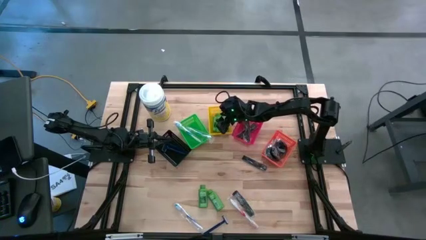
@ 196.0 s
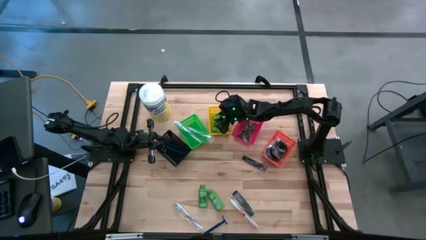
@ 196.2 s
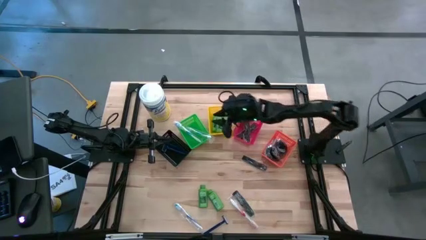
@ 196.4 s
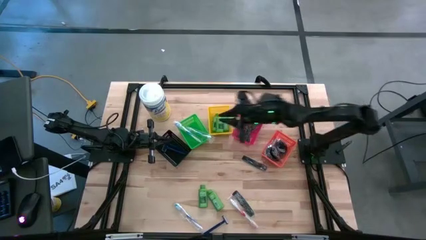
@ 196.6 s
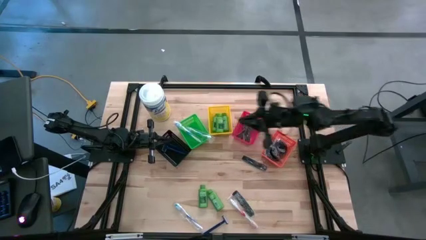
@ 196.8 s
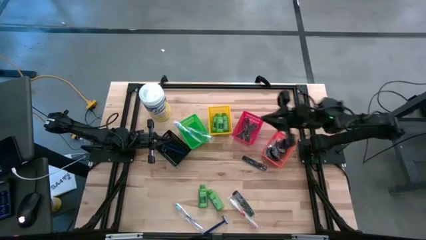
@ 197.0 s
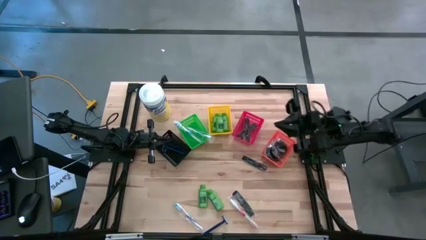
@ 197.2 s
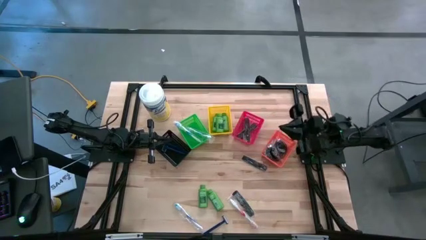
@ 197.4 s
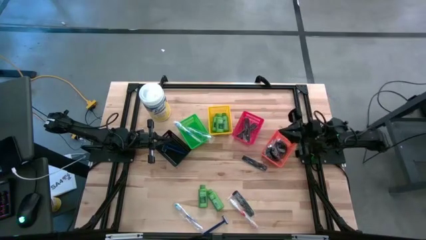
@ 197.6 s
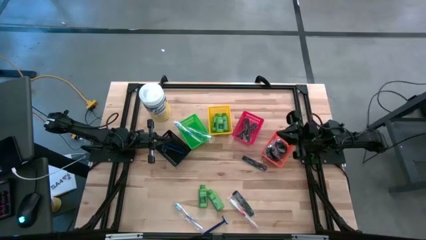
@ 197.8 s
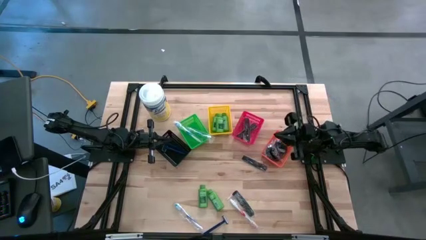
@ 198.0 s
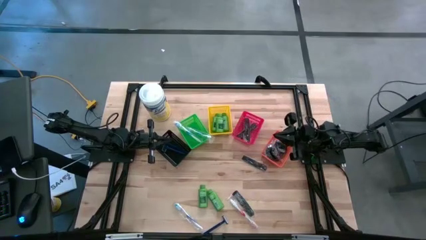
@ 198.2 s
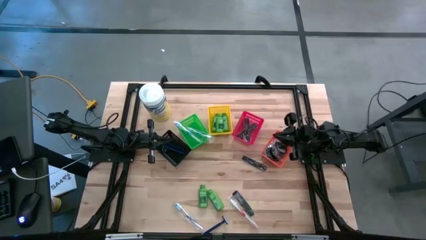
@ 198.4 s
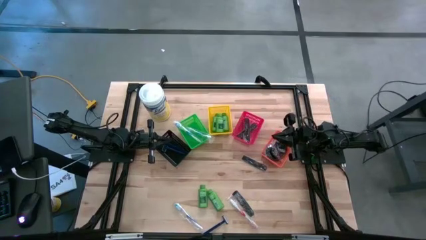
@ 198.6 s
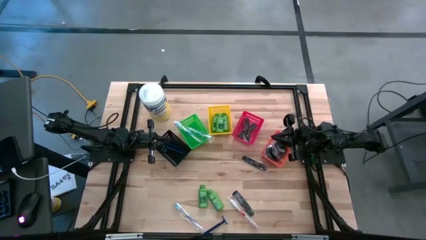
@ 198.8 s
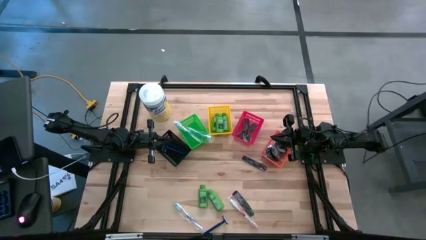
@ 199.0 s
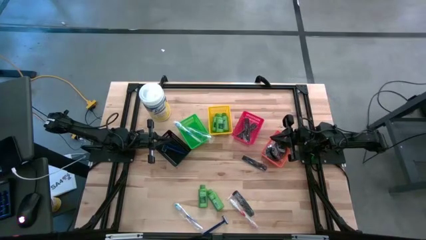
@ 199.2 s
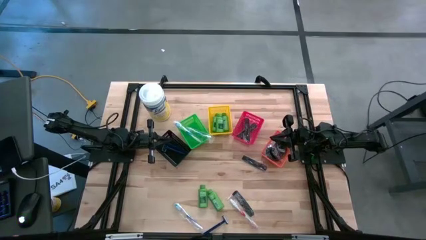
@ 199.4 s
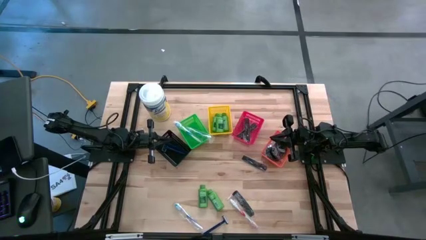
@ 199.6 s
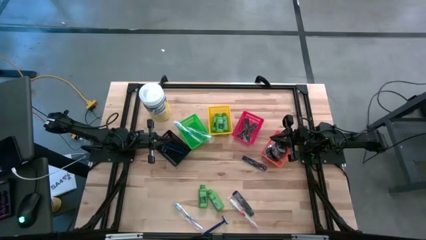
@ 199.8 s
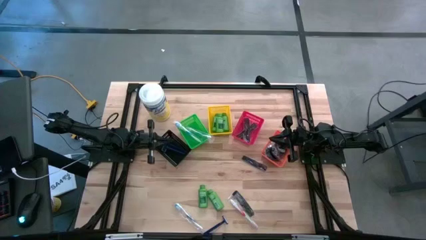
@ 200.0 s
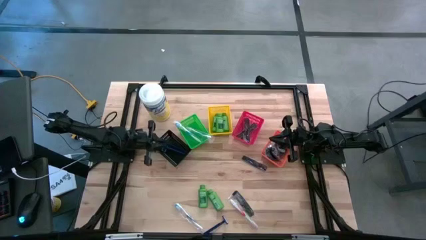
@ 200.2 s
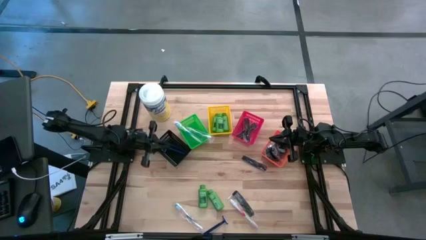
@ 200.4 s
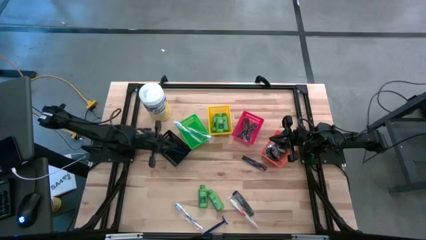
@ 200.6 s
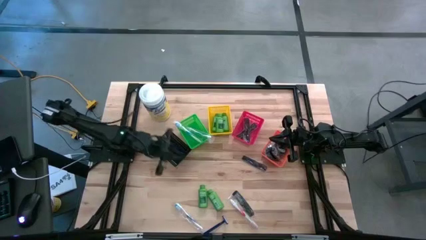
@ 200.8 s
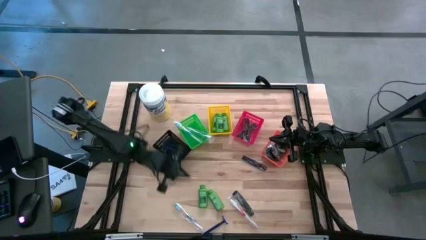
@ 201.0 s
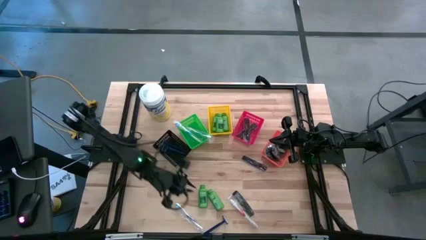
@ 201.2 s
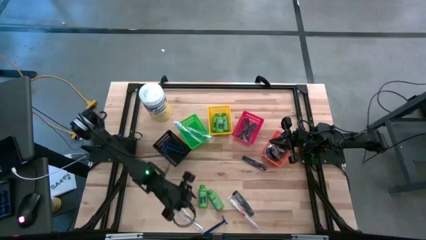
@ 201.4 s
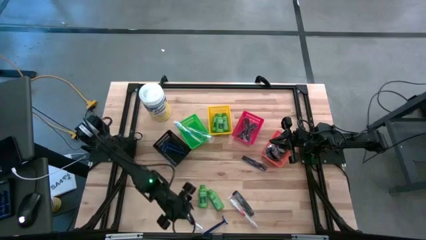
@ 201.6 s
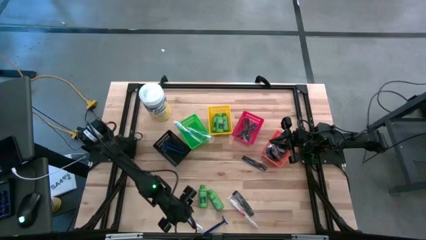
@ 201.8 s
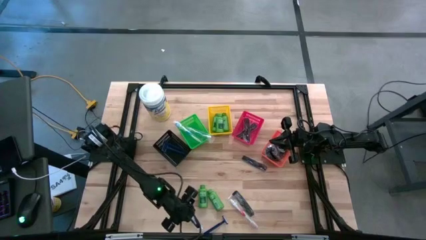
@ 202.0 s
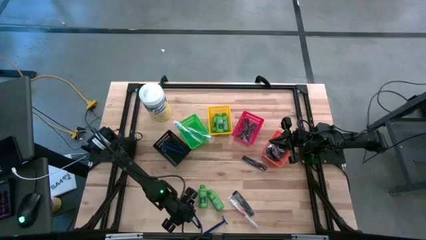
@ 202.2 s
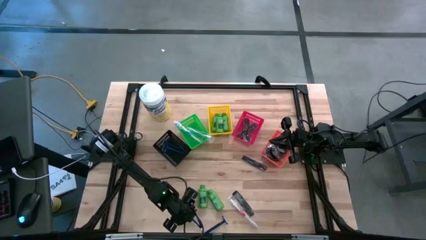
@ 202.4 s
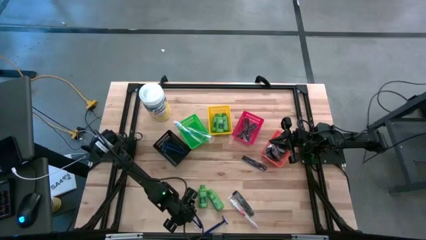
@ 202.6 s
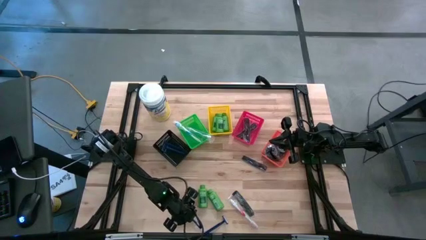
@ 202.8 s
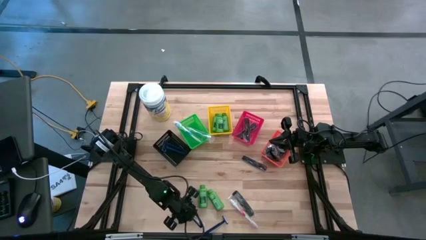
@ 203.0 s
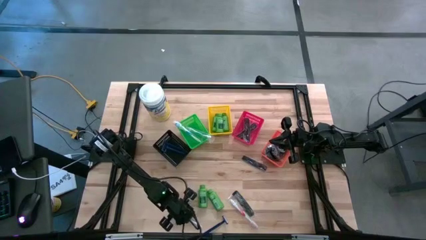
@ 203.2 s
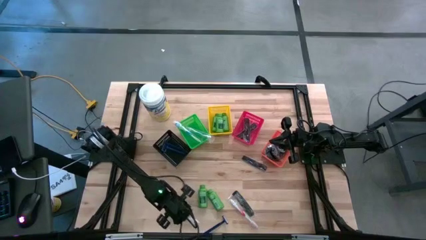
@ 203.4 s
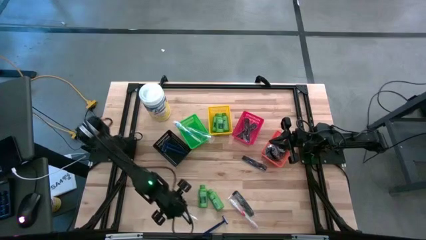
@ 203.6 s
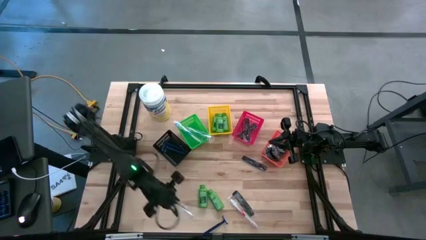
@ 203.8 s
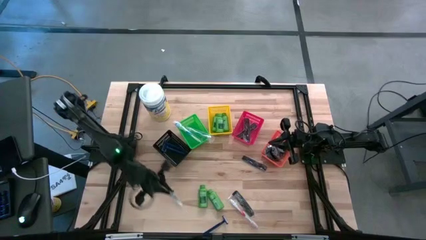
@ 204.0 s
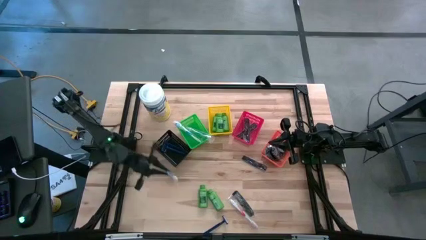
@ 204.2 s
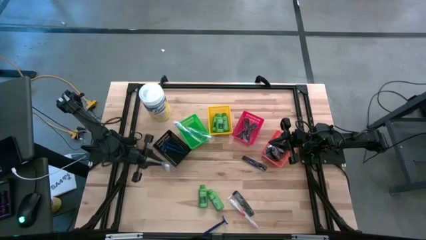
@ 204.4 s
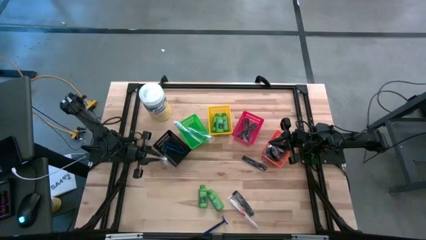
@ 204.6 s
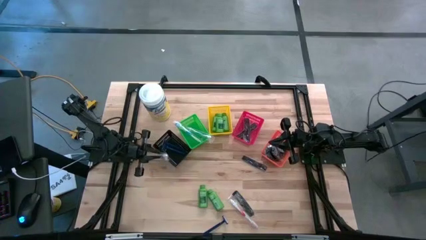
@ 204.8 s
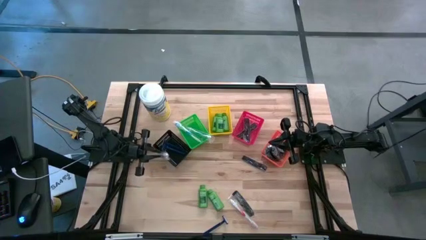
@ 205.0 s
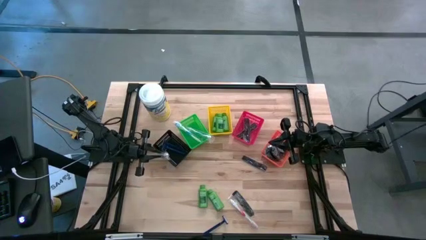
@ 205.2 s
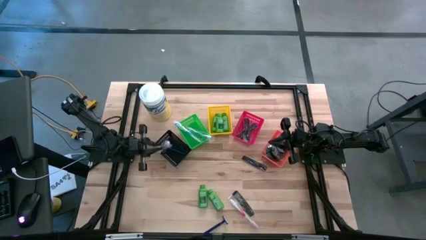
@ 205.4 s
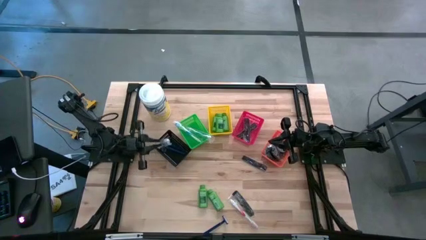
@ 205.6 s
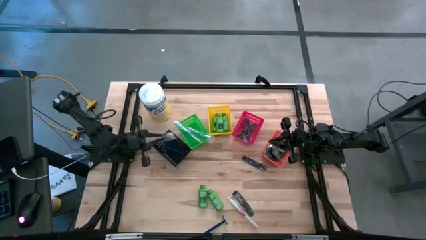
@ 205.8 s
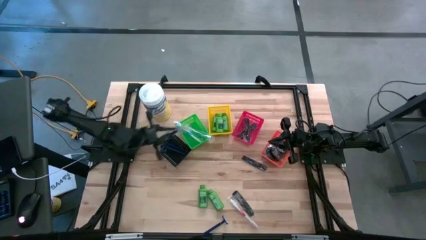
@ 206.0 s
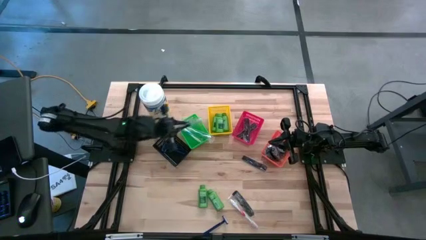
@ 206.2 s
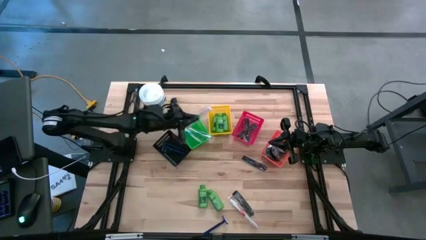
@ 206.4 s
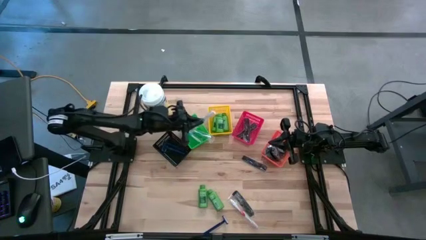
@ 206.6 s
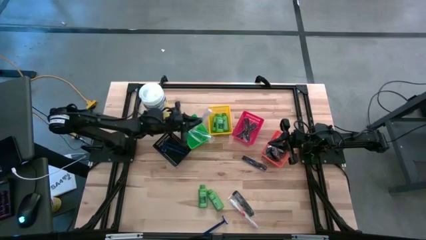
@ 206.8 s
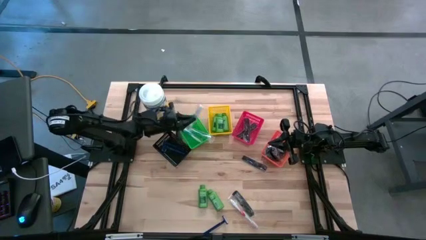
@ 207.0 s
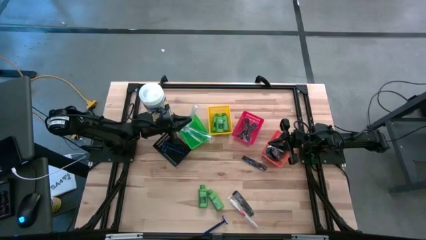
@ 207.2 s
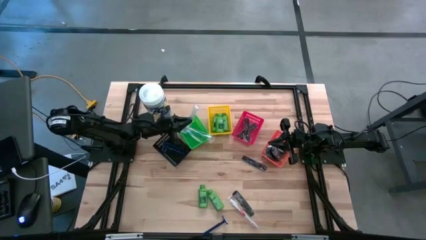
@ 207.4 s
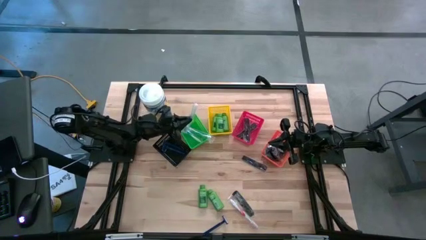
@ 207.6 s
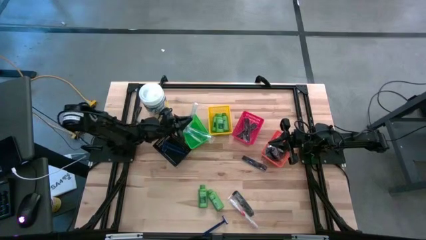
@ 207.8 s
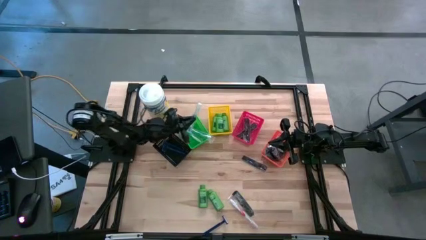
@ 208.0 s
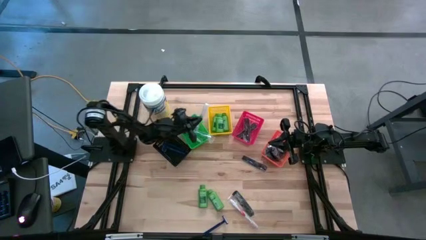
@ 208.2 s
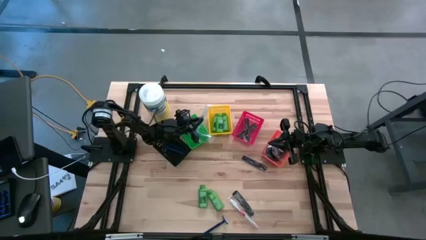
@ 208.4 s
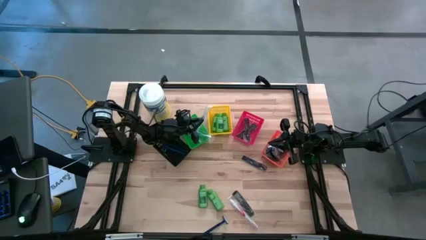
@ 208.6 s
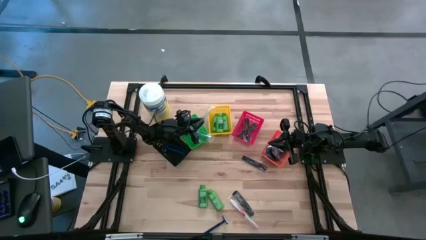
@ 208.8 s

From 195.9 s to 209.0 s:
Task: Pick & Place Travel size toiletries
Put the blue toothbrush into the green bin

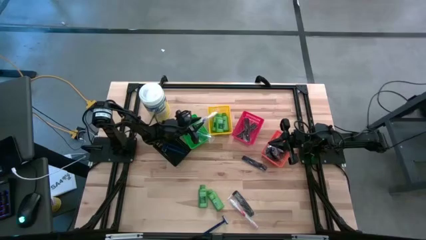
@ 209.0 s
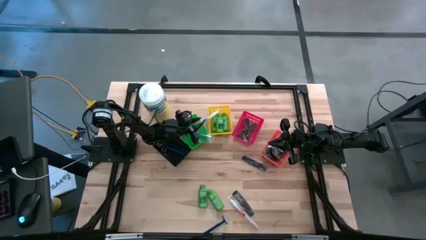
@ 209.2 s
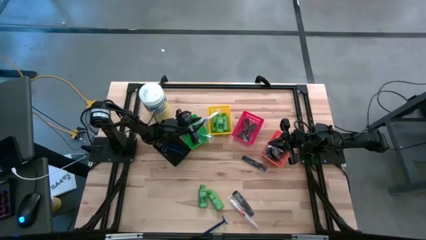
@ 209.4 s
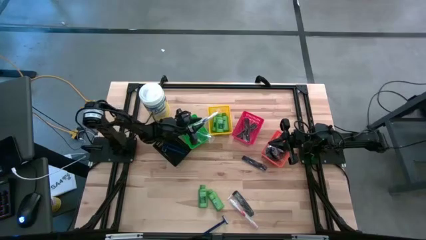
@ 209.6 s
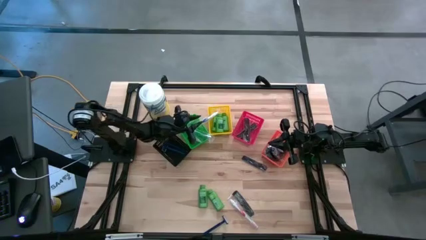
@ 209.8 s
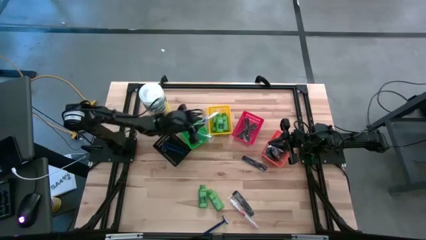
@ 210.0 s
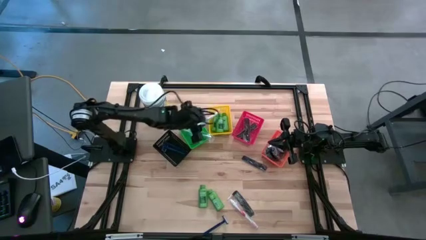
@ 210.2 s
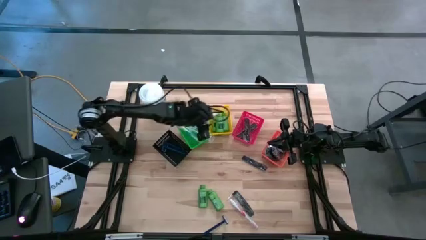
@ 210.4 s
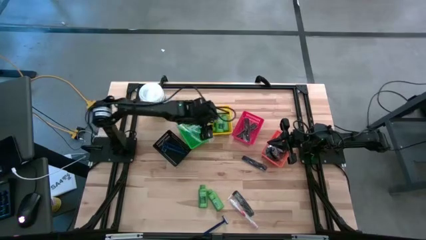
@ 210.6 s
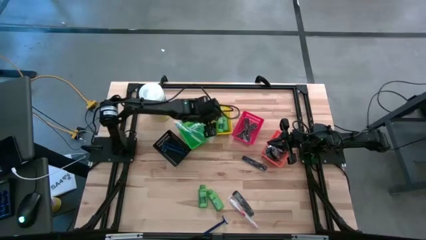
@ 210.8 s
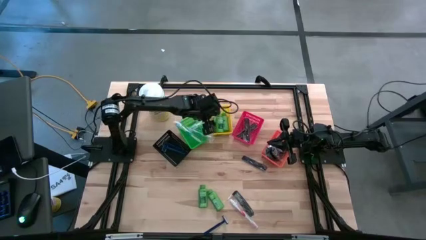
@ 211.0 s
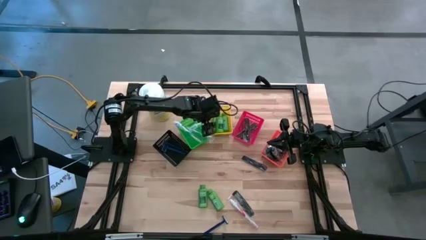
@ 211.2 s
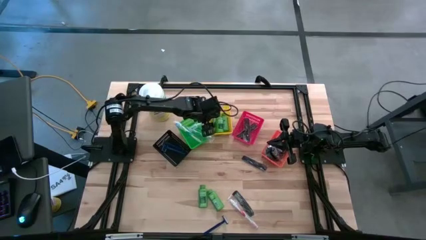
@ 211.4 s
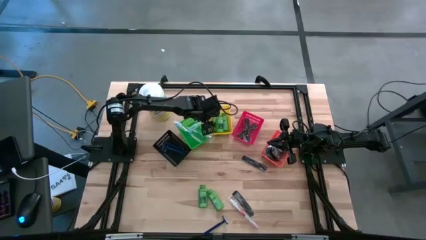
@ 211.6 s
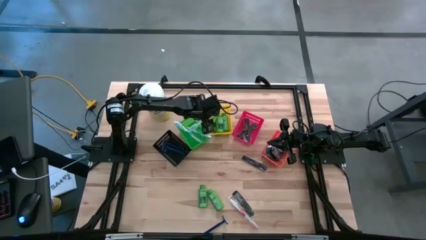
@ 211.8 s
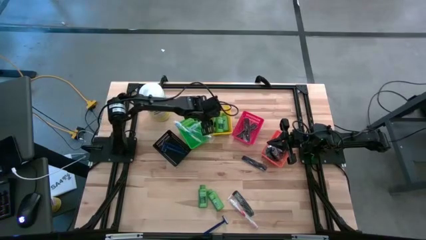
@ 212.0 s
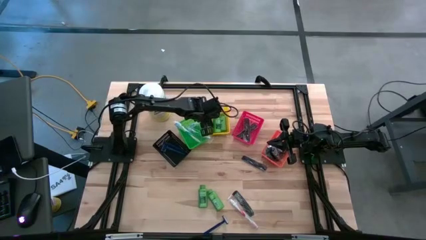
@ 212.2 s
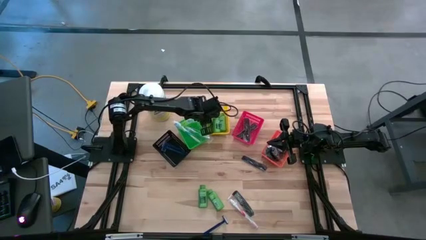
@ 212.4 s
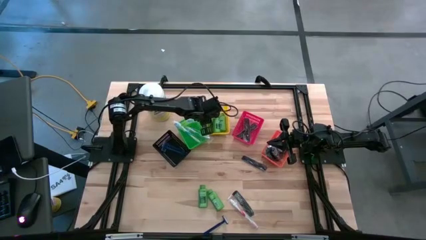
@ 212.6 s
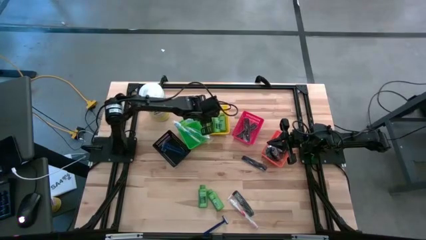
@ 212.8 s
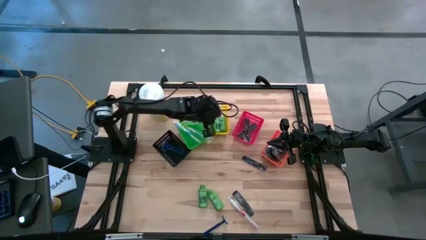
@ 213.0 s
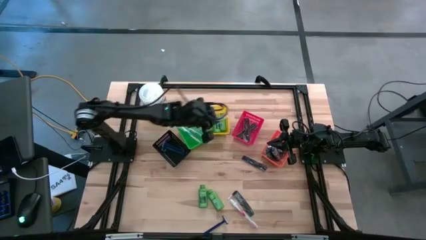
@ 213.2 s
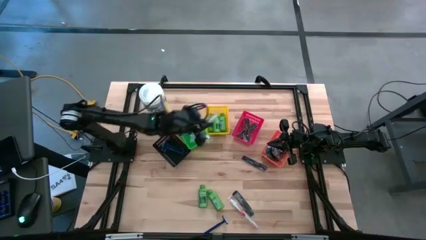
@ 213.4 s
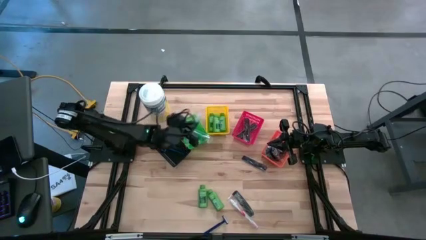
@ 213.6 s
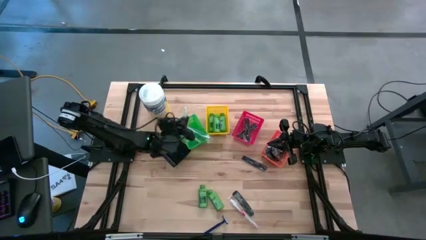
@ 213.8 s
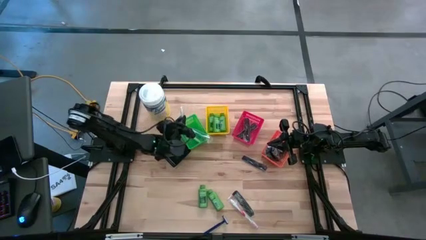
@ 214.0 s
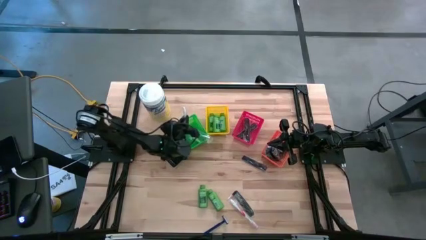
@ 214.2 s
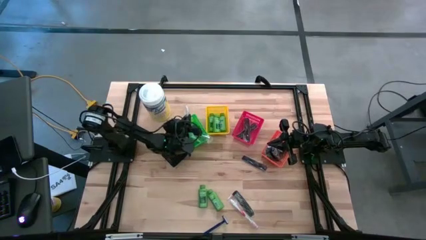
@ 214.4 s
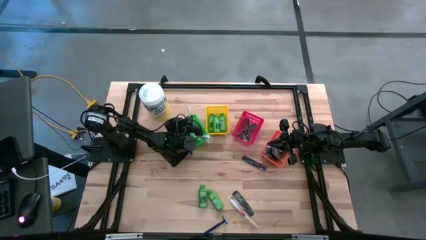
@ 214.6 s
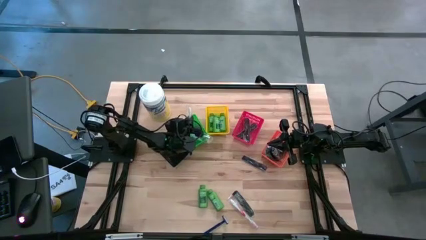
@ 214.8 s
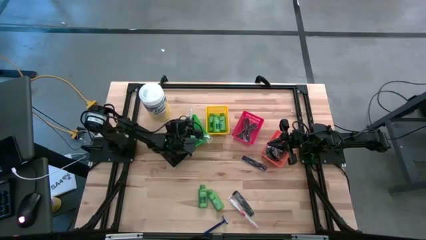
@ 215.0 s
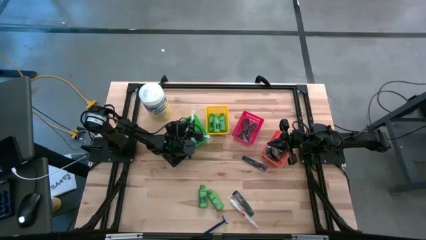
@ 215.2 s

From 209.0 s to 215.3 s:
Put the blue toothbrush into the green bin
